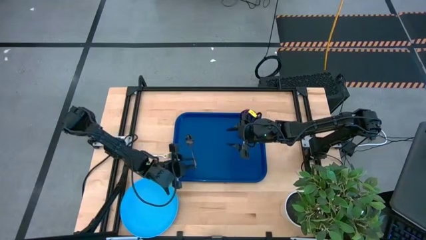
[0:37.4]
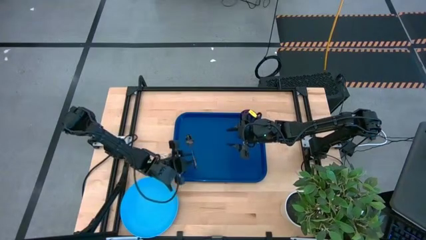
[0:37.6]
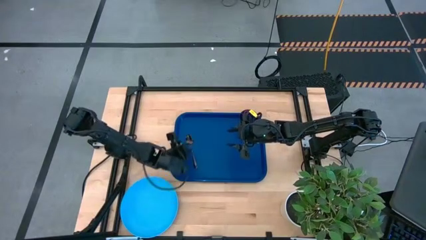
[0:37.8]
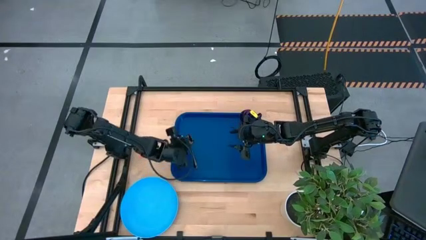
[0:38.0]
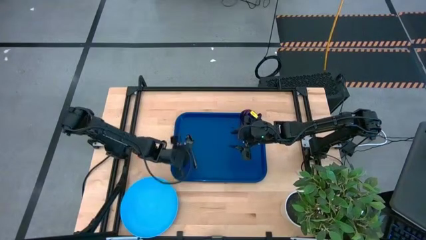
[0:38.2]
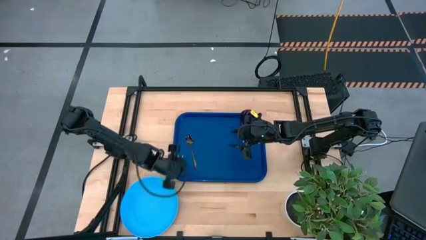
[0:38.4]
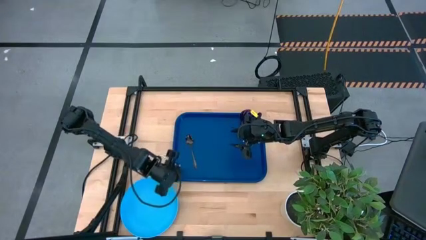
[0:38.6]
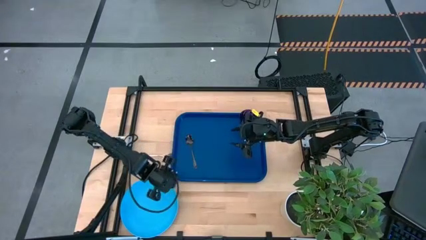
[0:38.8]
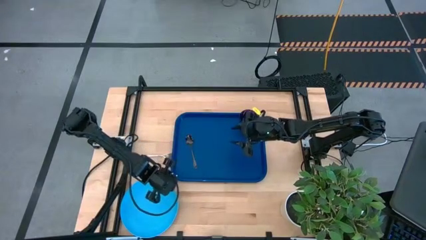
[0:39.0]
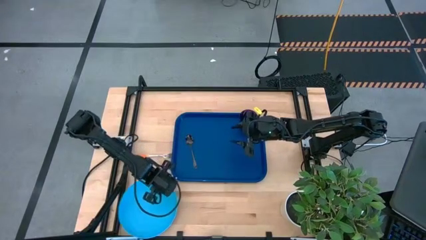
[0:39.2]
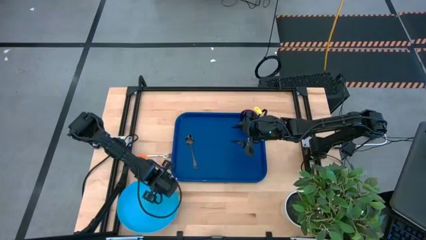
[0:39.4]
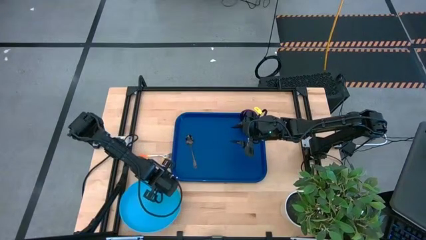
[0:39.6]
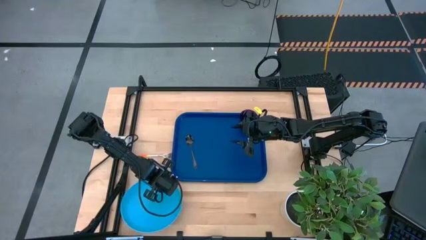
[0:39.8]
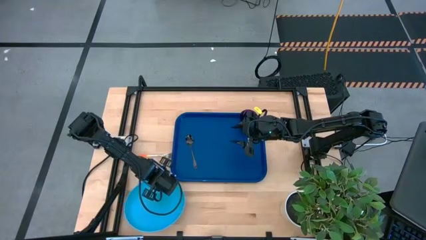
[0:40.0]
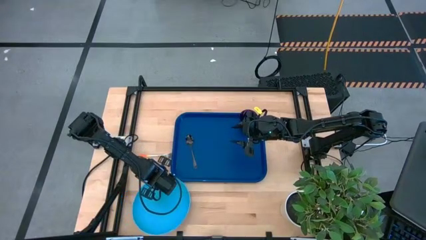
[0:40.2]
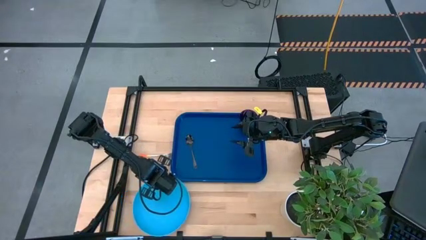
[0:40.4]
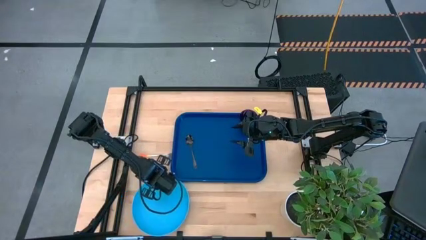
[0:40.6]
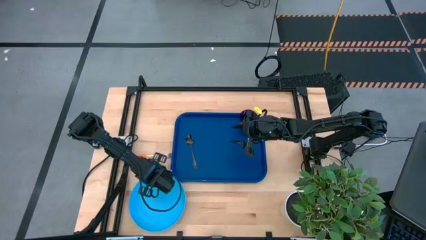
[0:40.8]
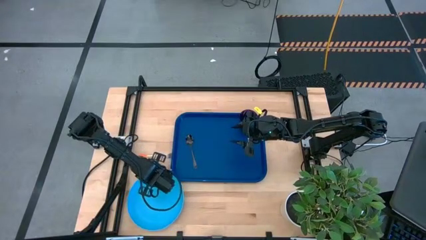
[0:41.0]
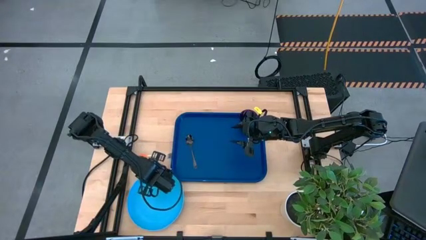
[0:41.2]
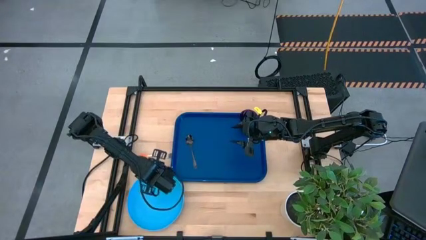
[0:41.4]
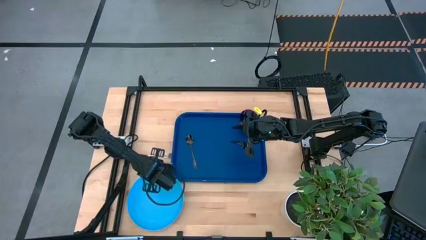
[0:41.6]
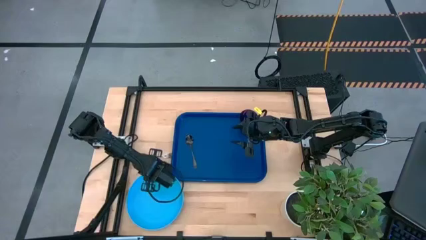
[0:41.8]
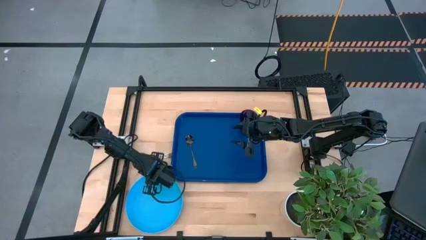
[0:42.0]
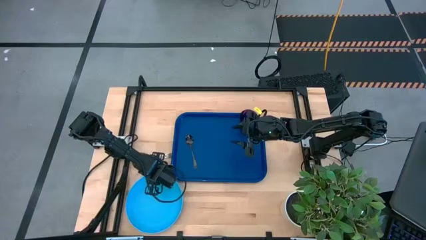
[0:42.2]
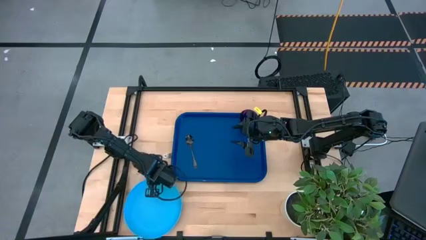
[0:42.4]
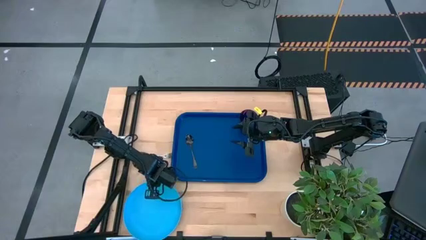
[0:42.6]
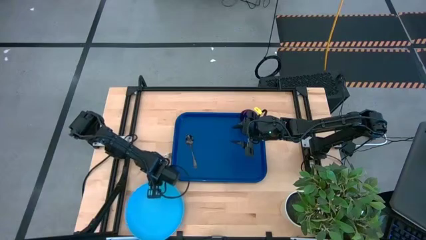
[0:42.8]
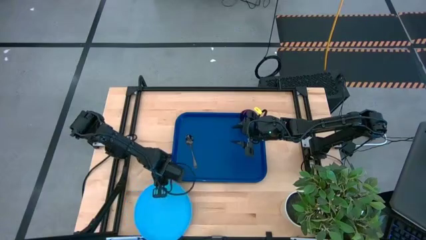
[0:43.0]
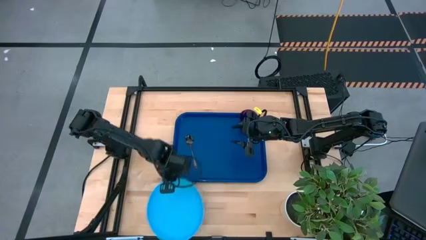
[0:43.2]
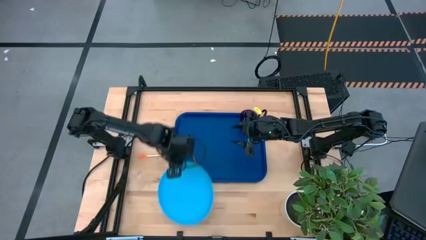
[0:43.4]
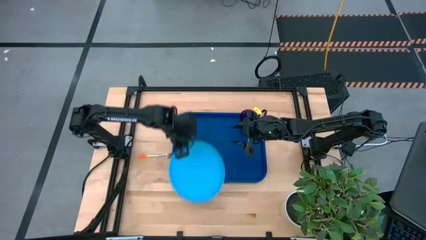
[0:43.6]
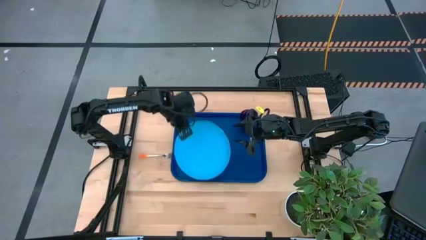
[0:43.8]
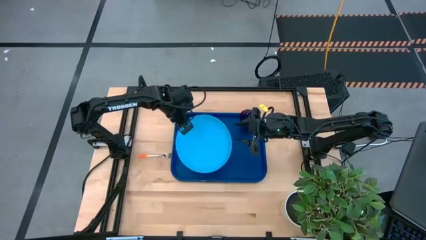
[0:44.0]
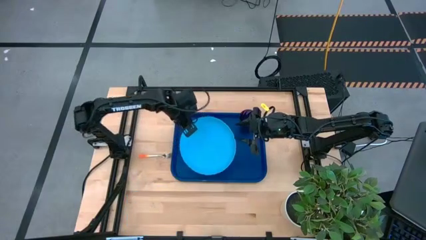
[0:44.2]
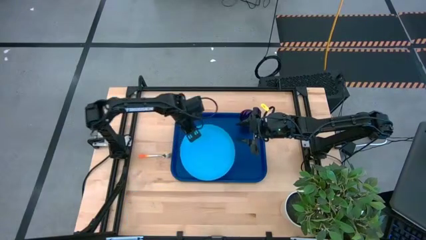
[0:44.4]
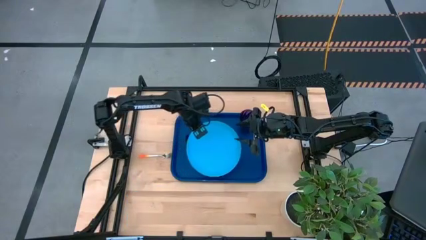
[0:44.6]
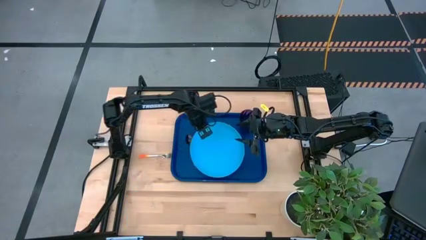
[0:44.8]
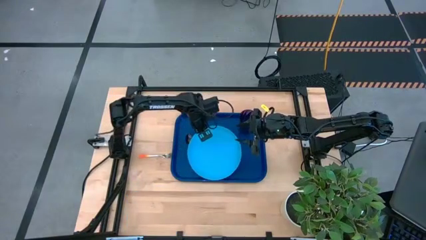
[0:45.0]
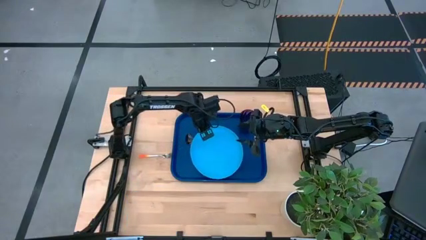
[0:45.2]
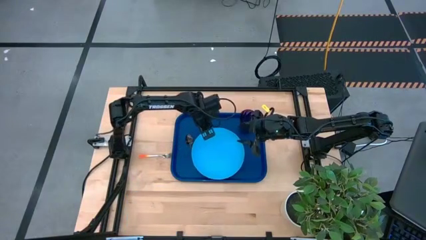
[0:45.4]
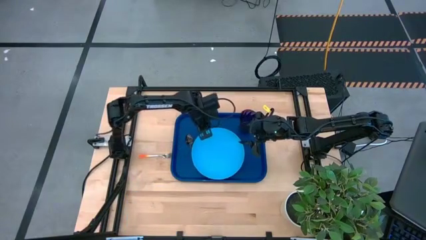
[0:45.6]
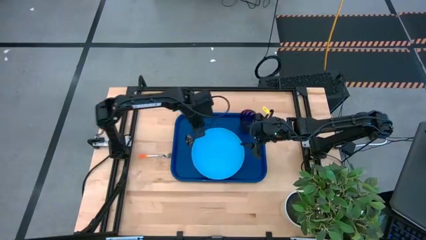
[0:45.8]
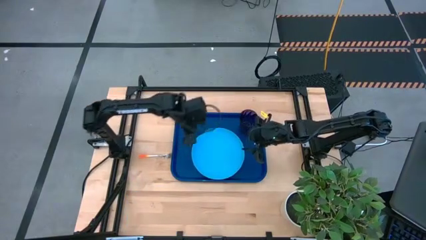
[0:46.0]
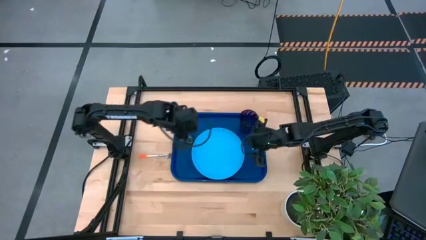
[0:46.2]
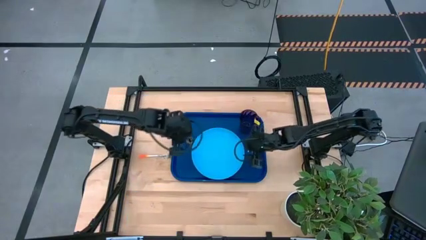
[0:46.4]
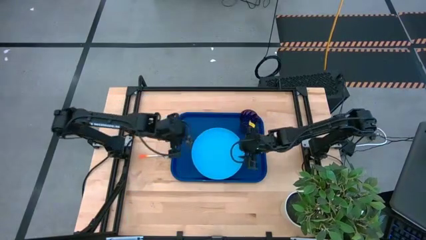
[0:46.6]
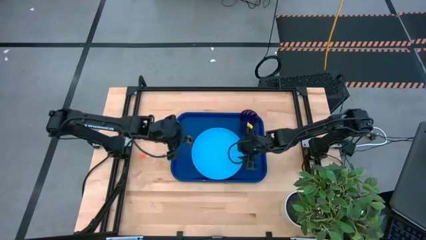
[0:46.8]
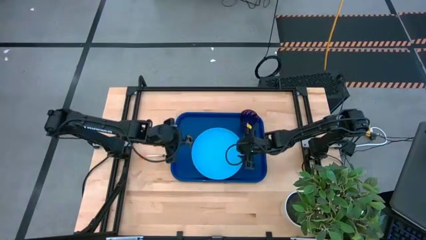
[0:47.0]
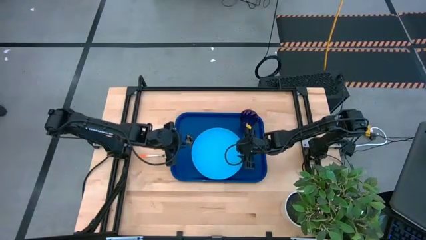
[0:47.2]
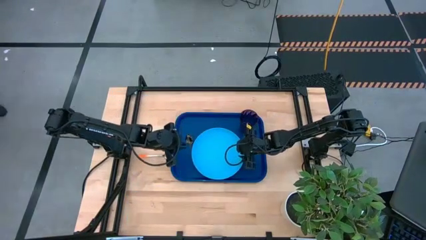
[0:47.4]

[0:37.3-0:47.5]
Task: Pick and place plate/cup/fork/spoon on tray
Put the light blue plate on the blue serving tray to the bottom left of the violet glass

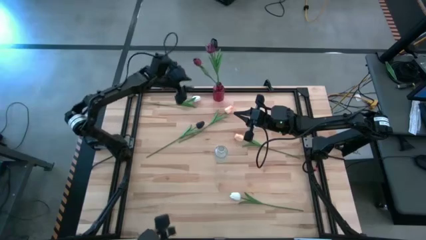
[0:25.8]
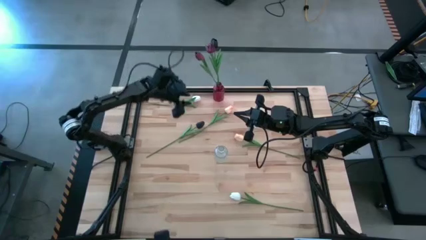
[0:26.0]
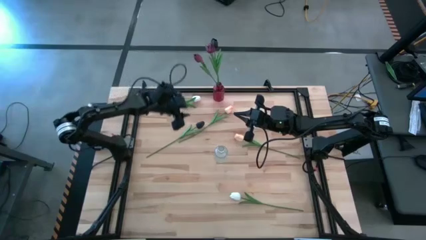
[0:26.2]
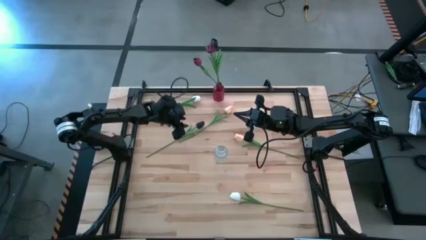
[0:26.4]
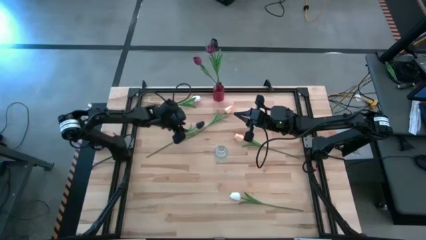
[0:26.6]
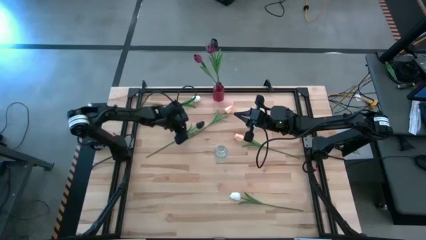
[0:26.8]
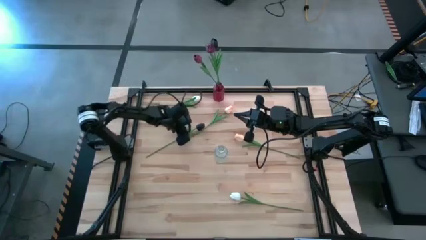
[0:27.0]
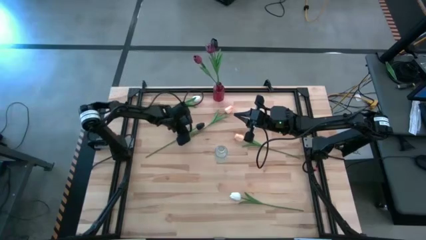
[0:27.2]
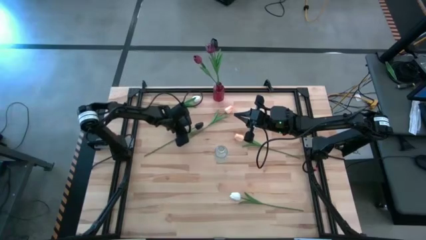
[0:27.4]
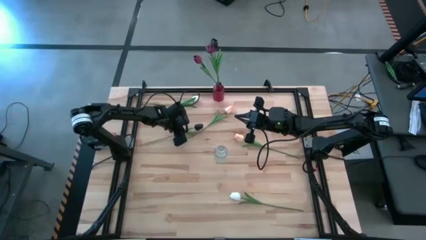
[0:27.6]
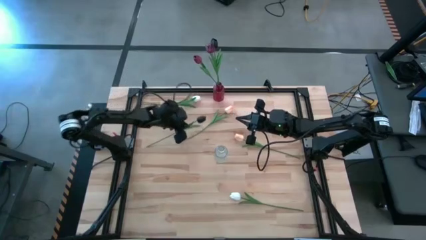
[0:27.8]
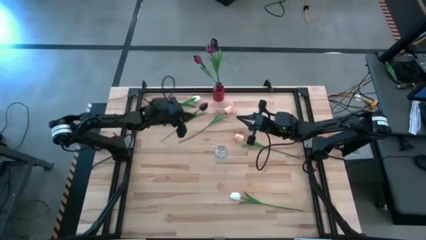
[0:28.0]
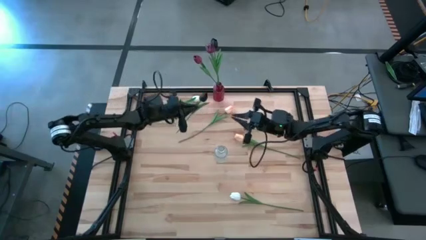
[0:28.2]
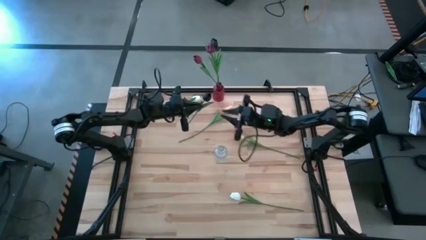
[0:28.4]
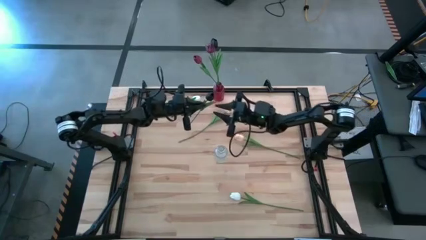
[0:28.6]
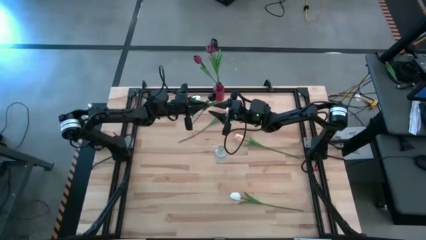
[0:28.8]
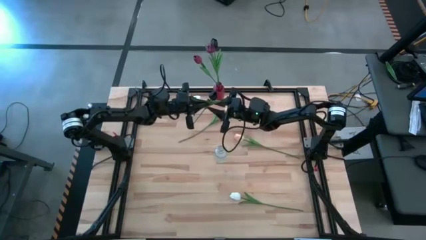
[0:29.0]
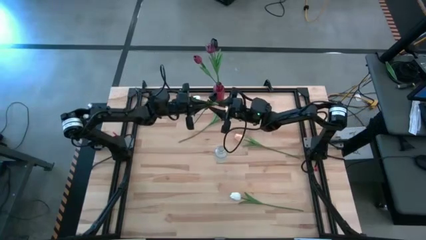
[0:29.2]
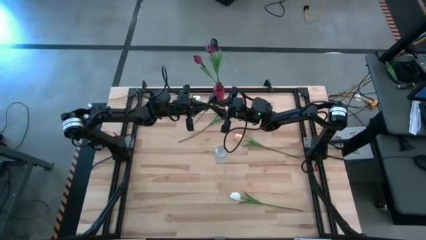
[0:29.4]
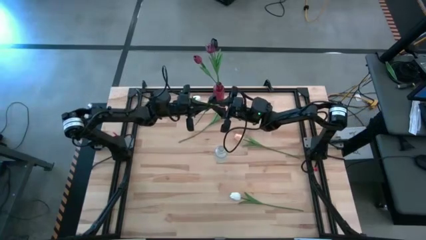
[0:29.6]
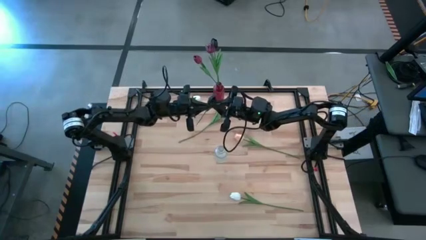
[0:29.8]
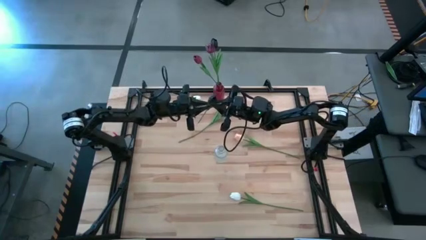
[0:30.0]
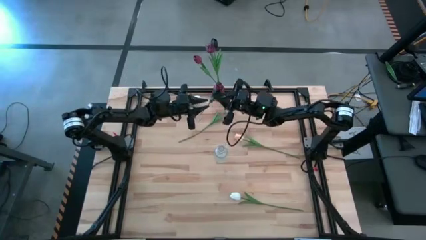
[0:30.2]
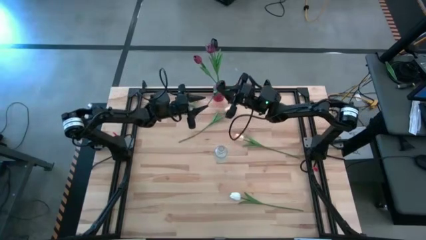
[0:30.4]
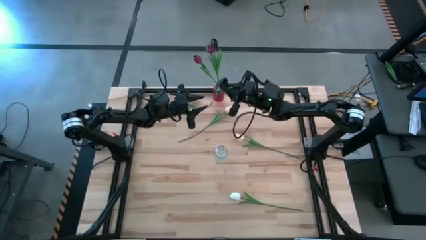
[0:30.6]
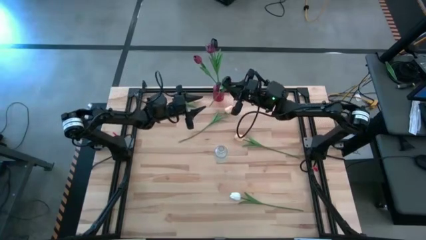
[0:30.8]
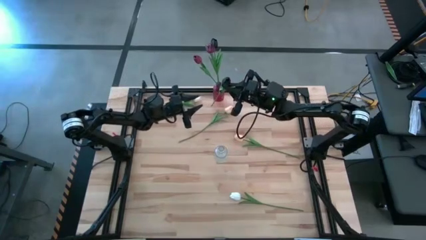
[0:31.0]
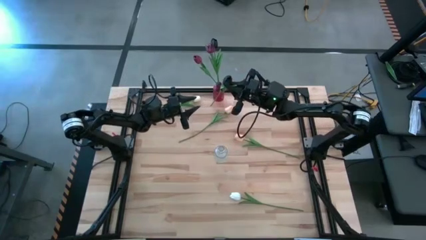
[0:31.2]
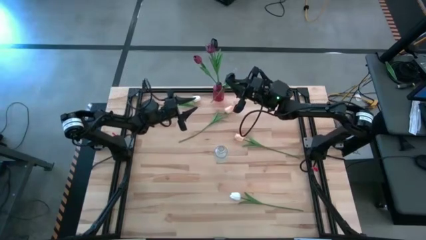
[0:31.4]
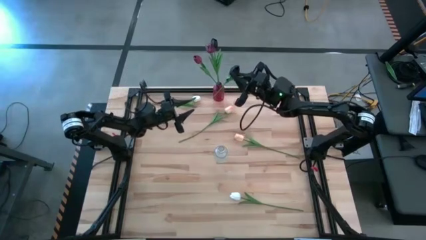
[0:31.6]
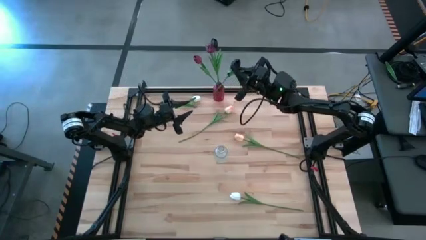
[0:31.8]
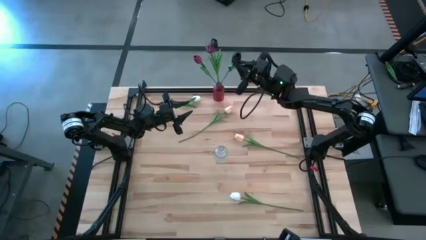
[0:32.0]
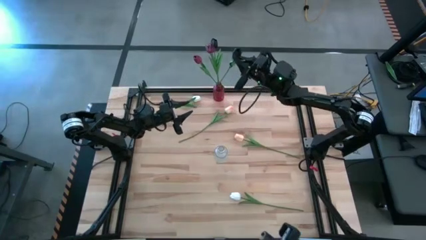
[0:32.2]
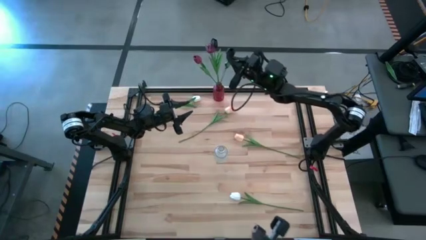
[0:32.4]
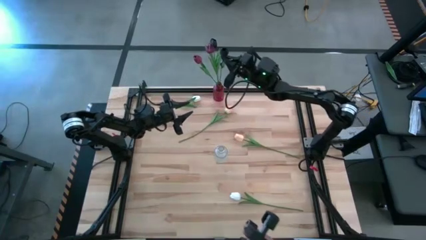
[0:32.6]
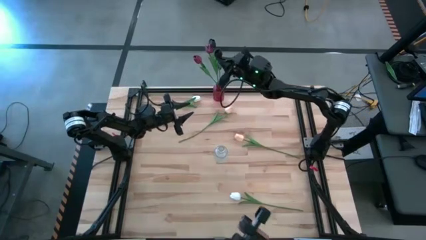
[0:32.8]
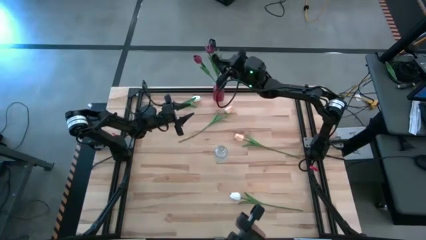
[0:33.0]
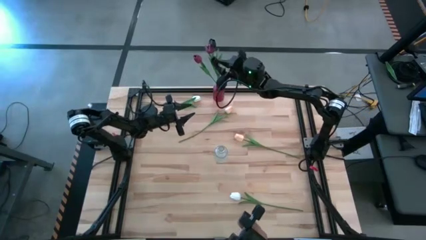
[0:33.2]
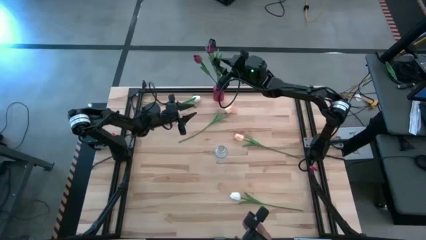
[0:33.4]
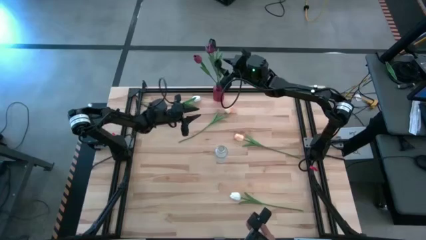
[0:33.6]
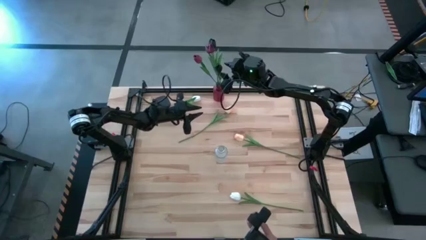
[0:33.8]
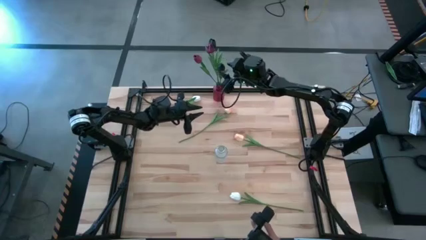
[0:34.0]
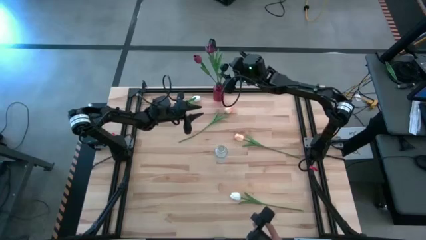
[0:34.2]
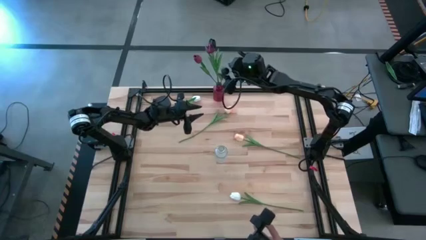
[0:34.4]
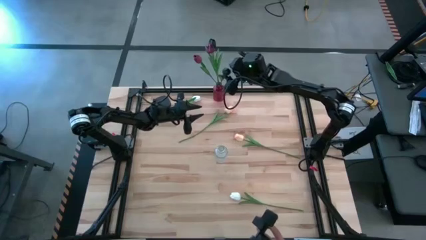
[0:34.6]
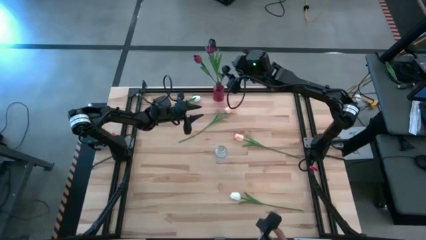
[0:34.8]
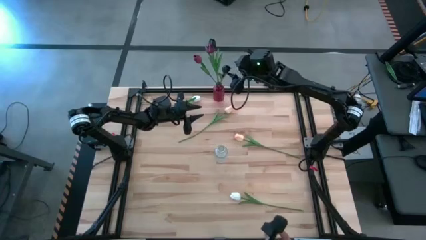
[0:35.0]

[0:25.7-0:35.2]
Task: Sort flowers into vase by color
Put the black tulip into the red vase
